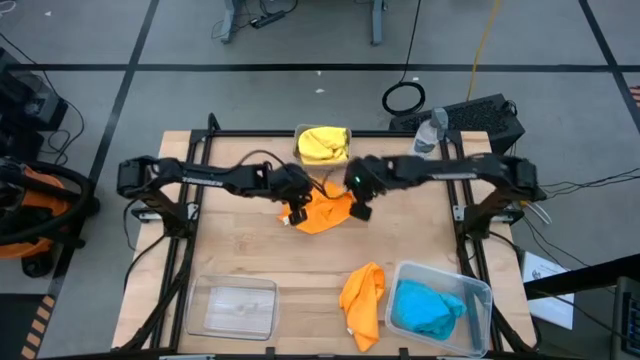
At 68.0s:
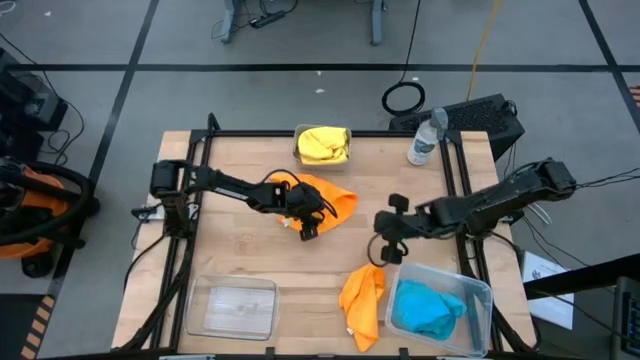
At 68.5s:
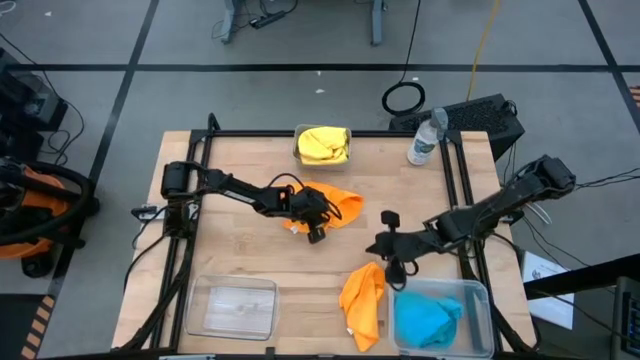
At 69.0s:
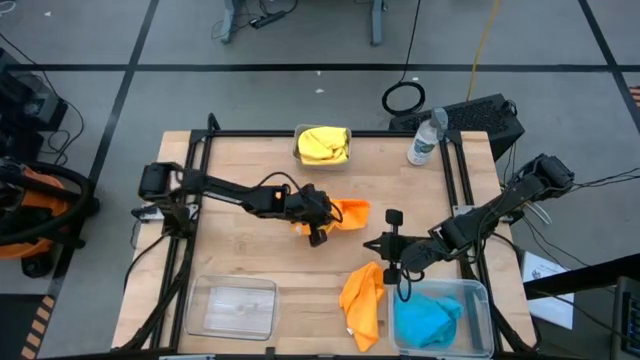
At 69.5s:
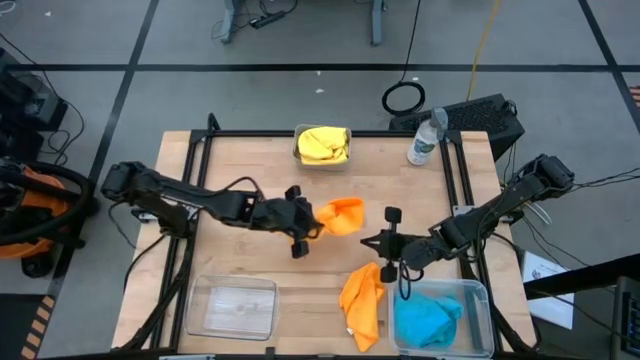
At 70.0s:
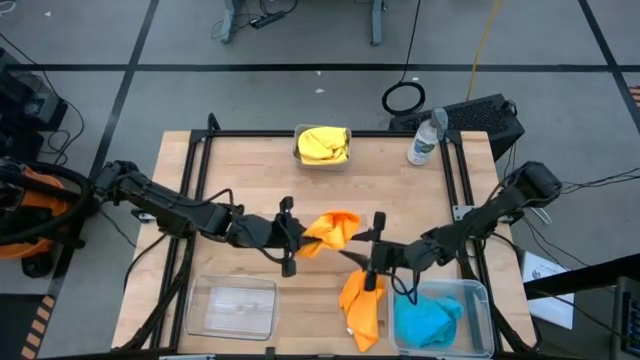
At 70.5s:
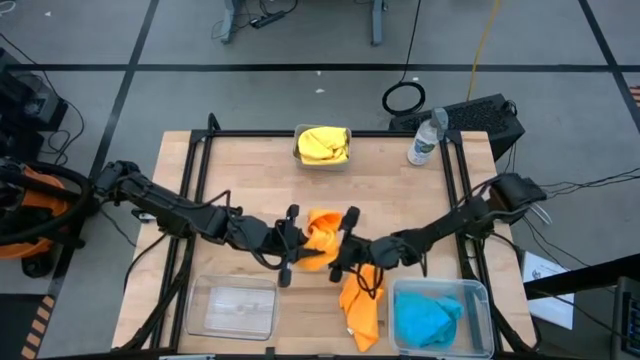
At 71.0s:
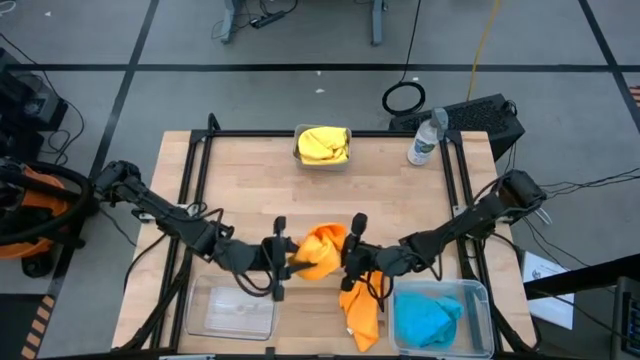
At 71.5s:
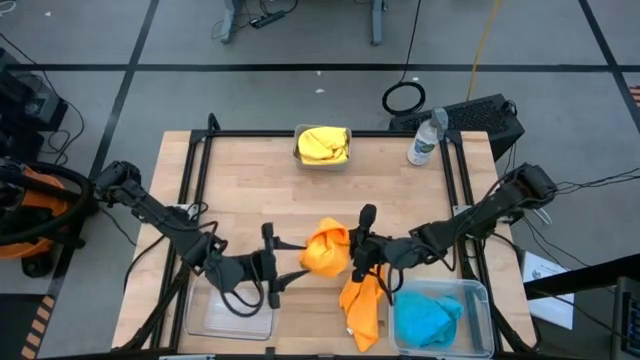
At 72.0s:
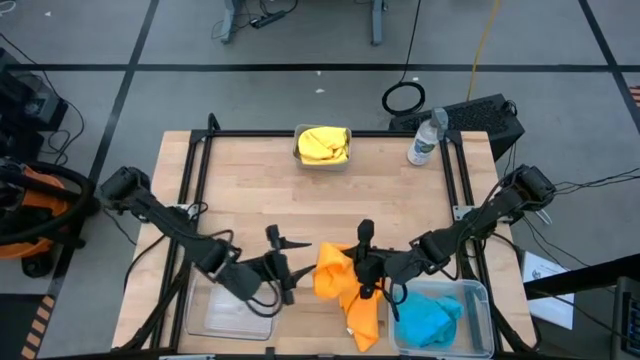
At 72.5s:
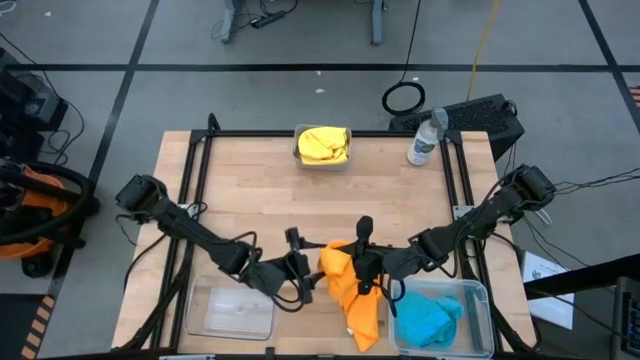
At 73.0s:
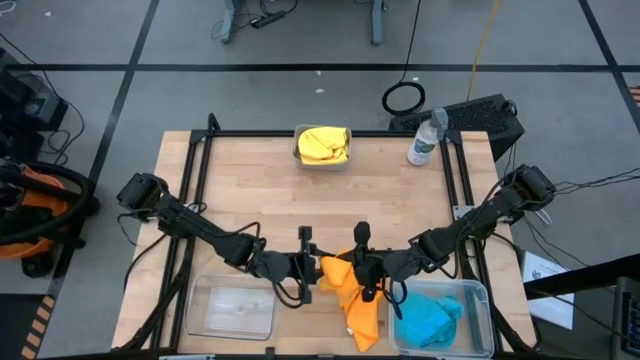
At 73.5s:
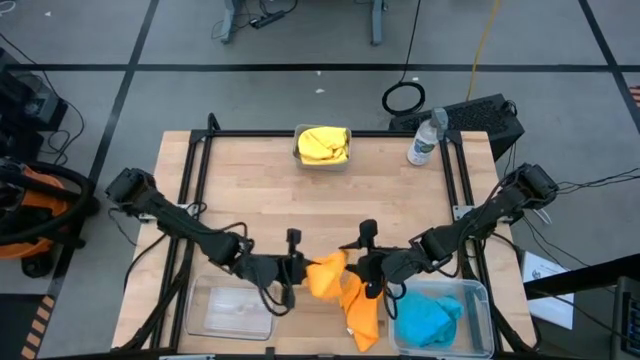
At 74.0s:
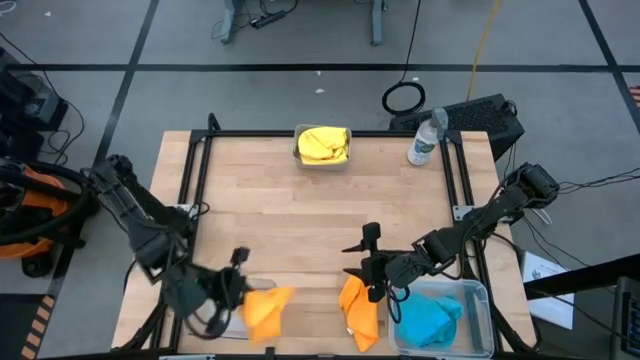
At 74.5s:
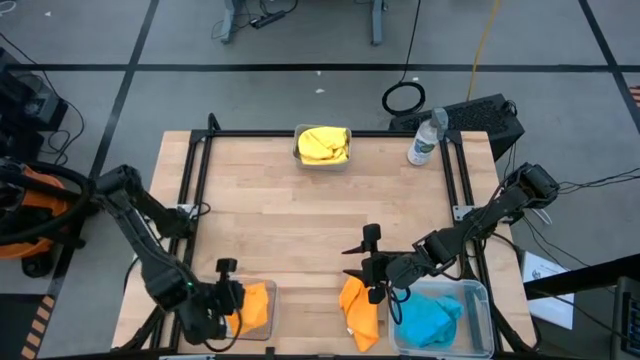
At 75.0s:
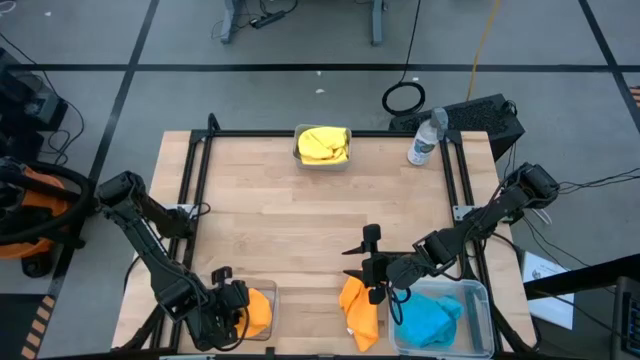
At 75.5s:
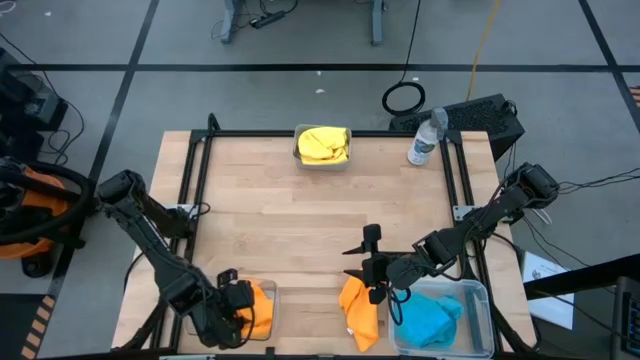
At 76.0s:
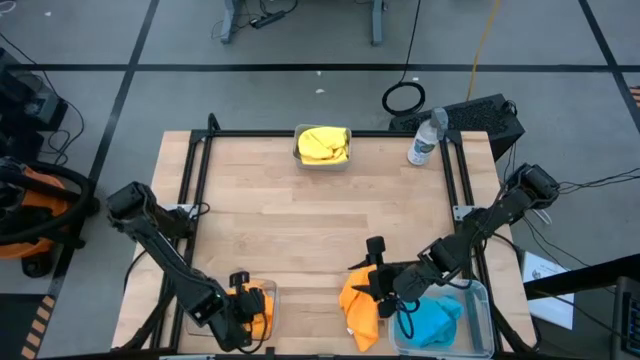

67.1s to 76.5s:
Task: Sort microfiber towel by color & place in baskets
Put the top orange microfiber cloth into the left transparent bin

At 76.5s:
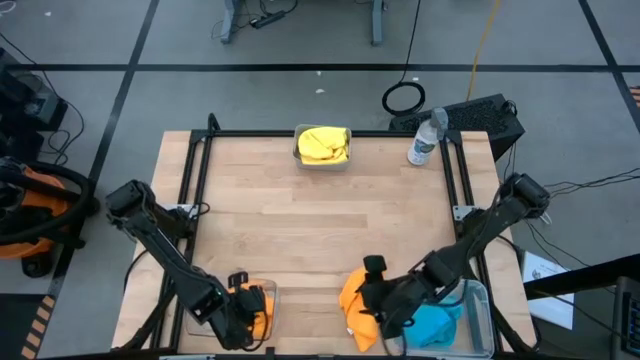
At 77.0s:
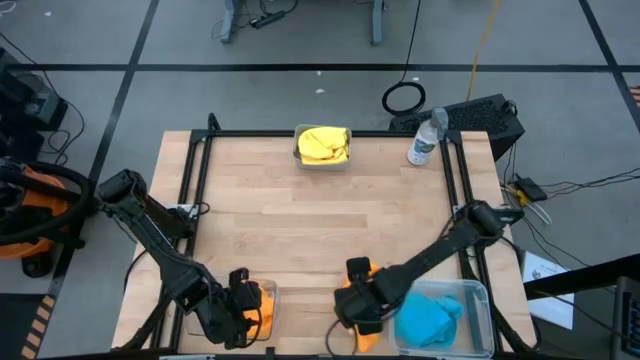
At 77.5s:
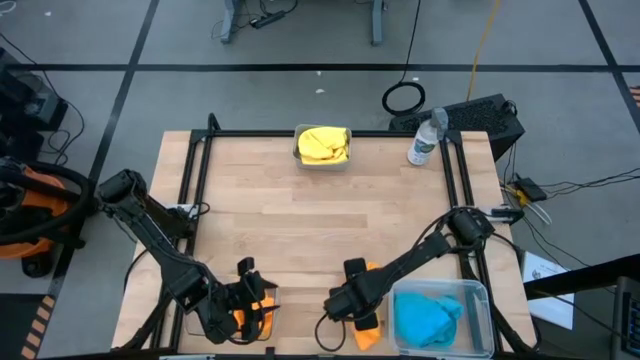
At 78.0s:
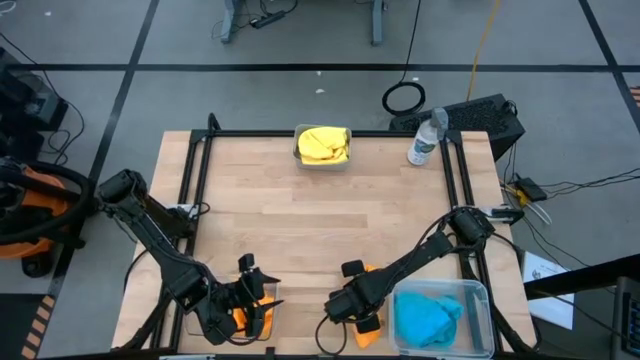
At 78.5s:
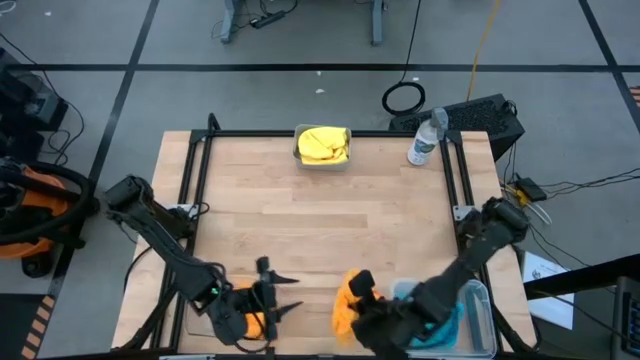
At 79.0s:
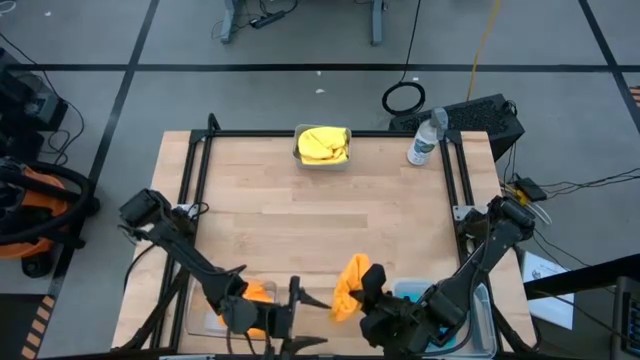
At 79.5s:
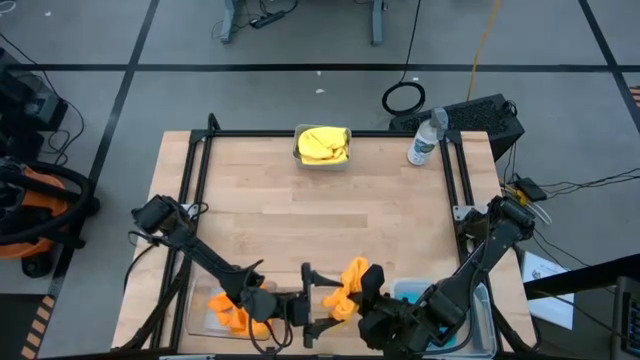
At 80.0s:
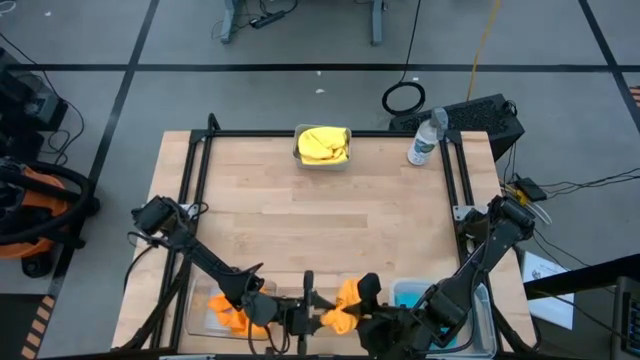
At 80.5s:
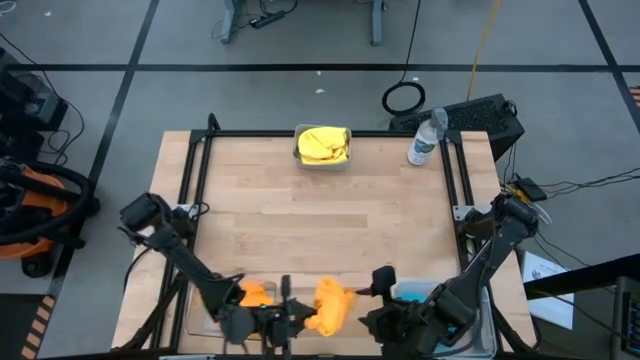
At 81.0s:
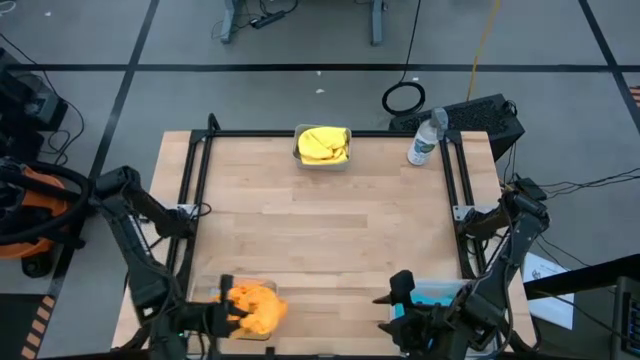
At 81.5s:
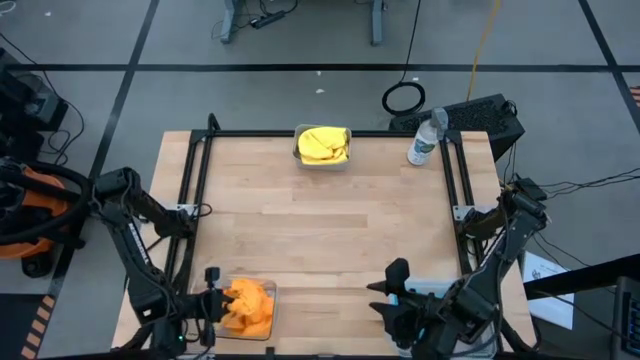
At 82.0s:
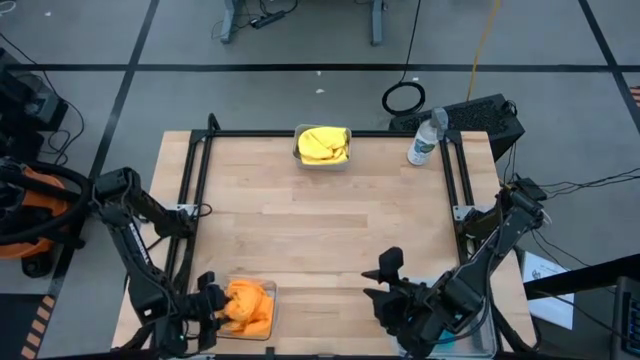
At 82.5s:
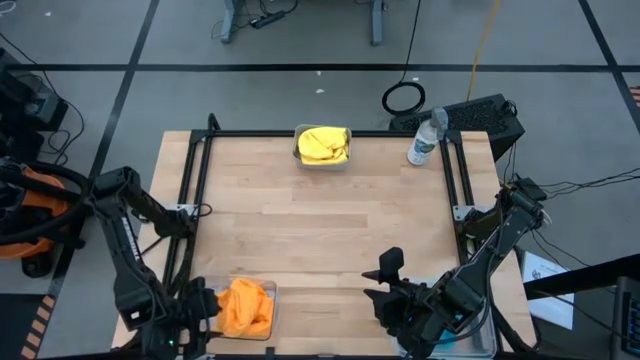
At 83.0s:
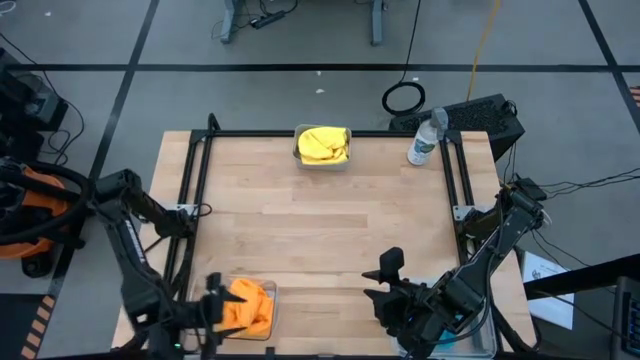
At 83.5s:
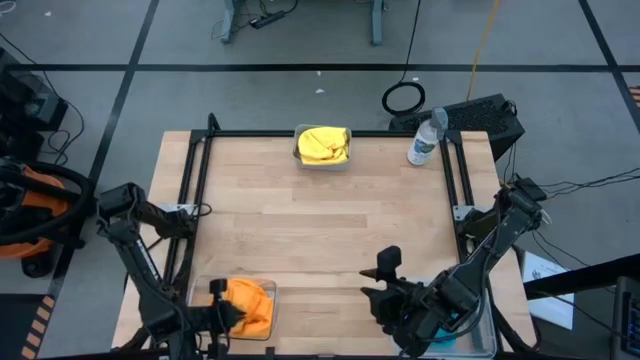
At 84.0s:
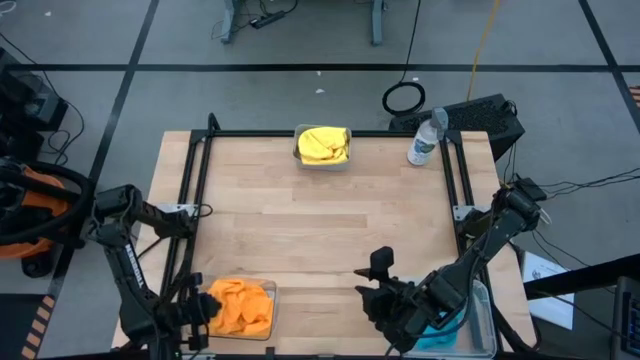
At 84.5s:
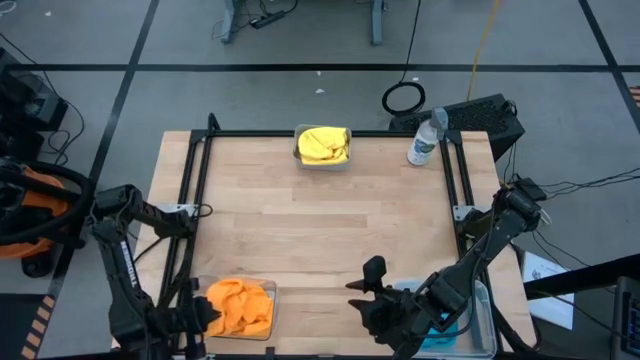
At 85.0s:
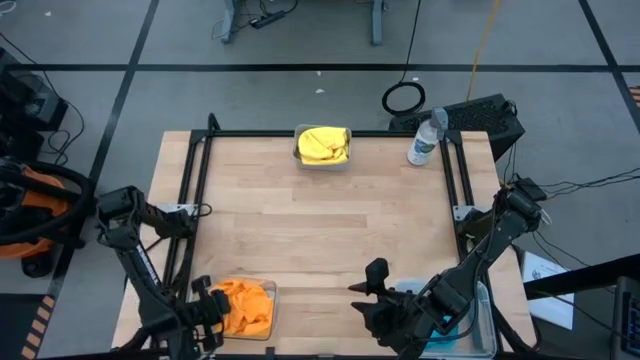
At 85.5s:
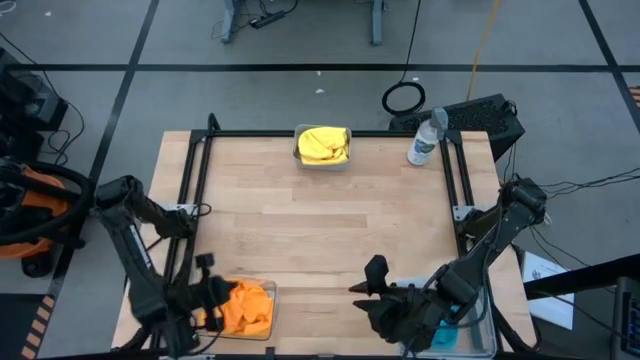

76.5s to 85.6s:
Put the orange microfiber cloth into the left transparent bin

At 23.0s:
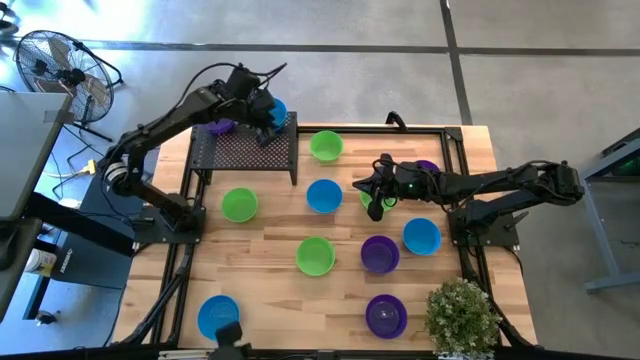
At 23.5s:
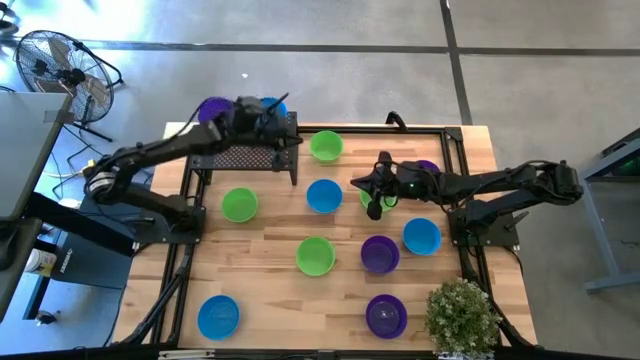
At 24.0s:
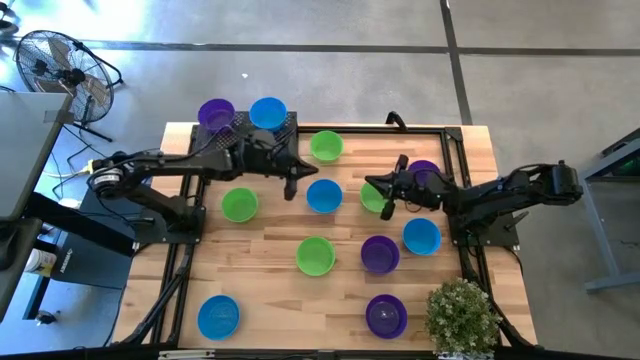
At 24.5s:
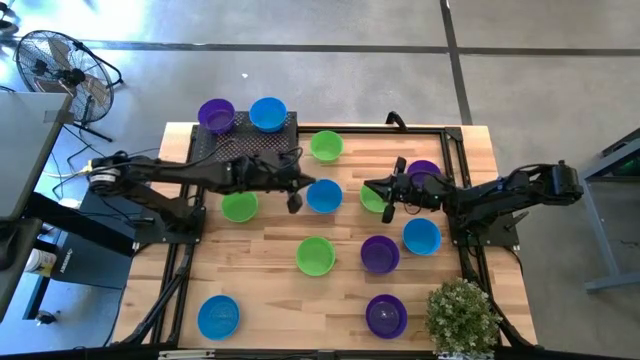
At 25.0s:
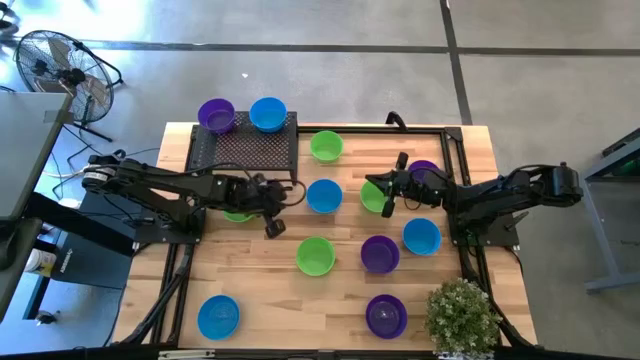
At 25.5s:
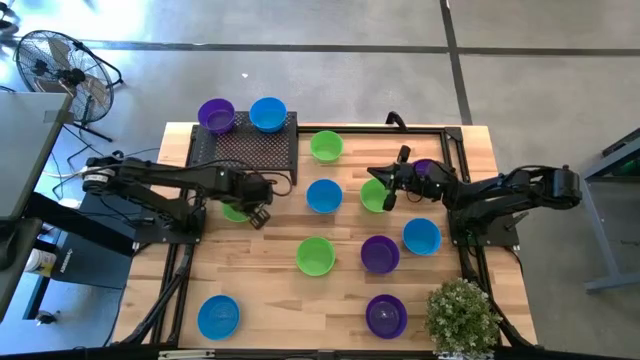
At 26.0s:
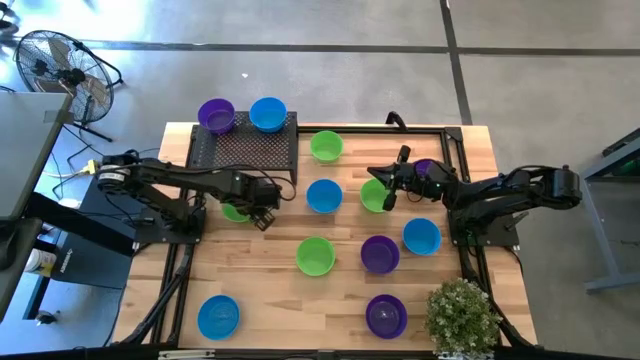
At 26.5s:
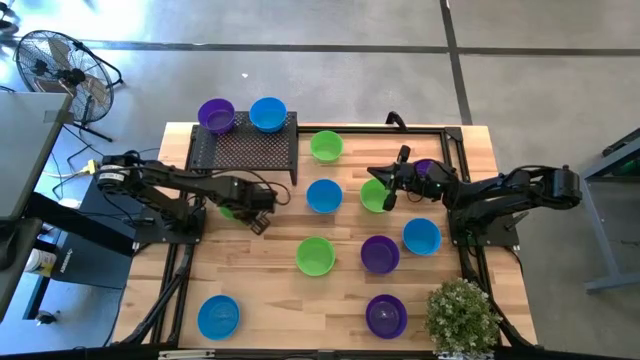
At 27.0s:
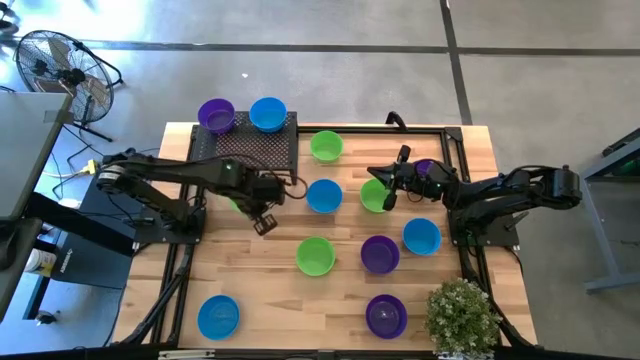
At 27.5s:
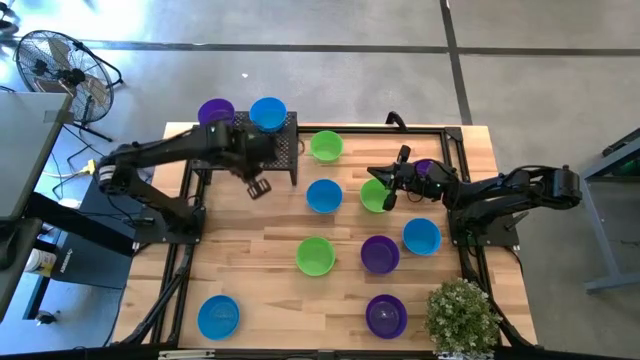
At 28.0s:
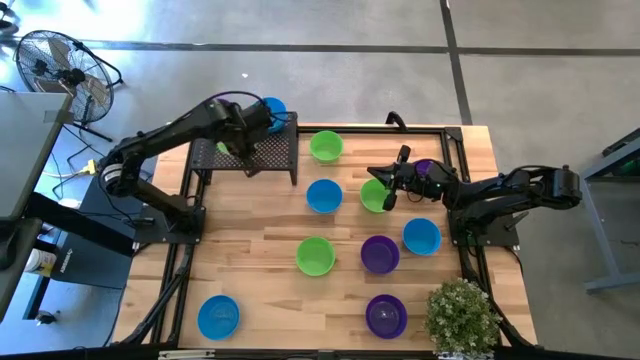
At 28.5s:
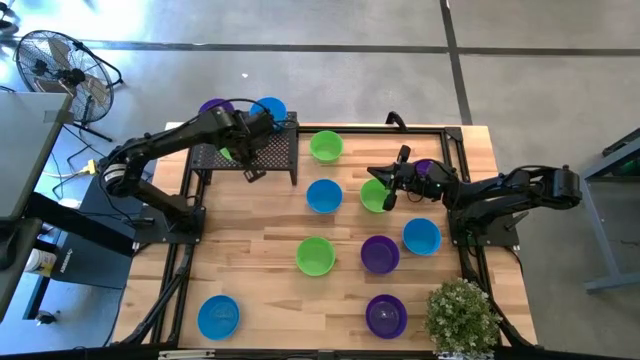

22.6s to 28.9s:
Task: Pick & Place Mini bowls
Put the green bowl on the shelf
